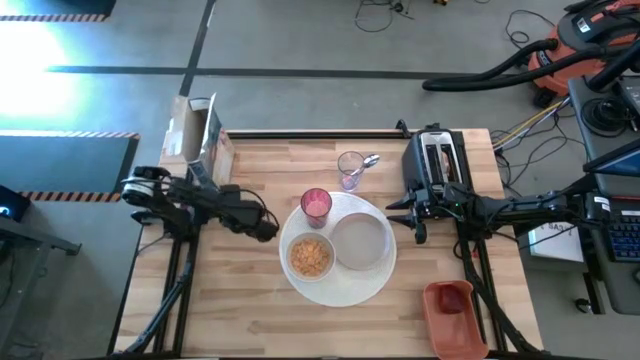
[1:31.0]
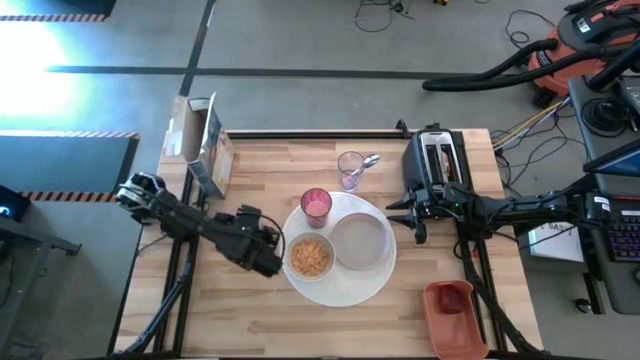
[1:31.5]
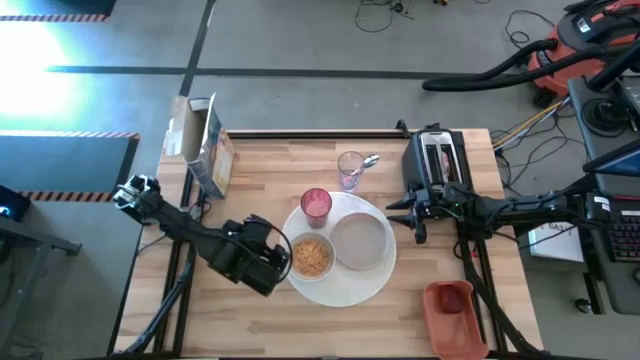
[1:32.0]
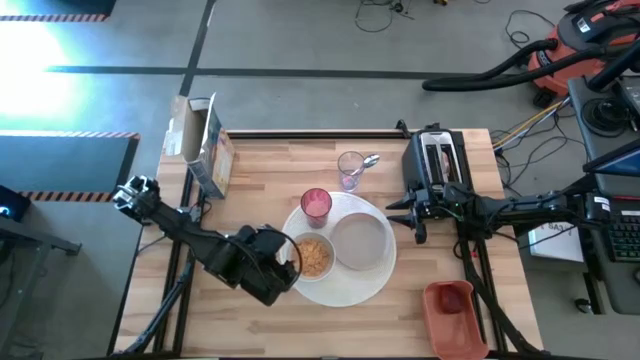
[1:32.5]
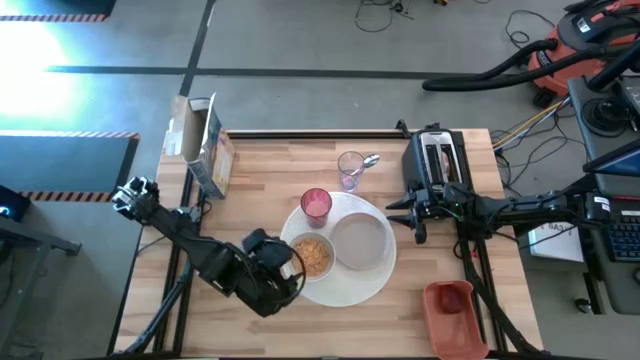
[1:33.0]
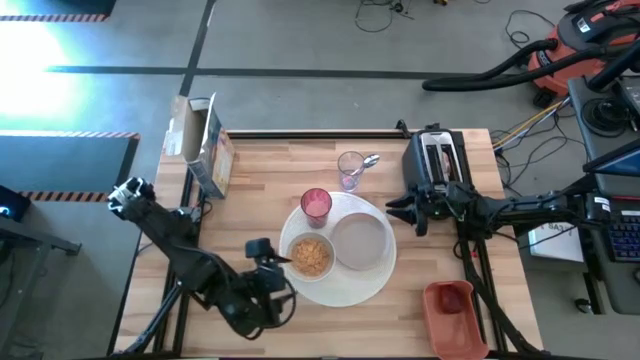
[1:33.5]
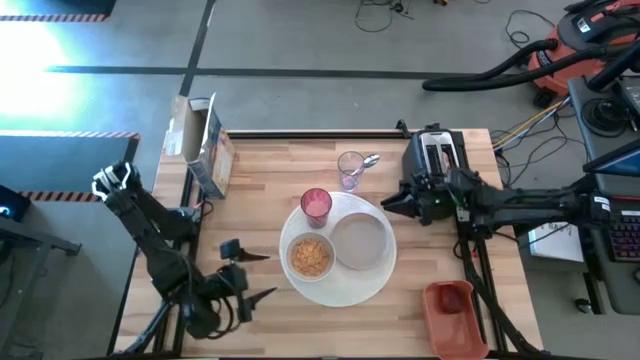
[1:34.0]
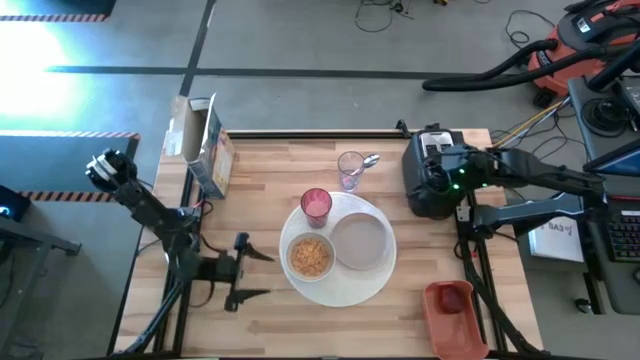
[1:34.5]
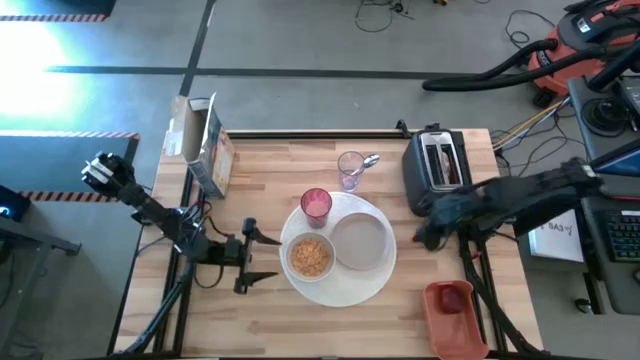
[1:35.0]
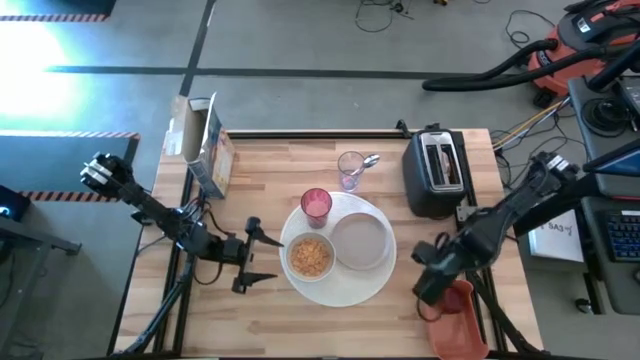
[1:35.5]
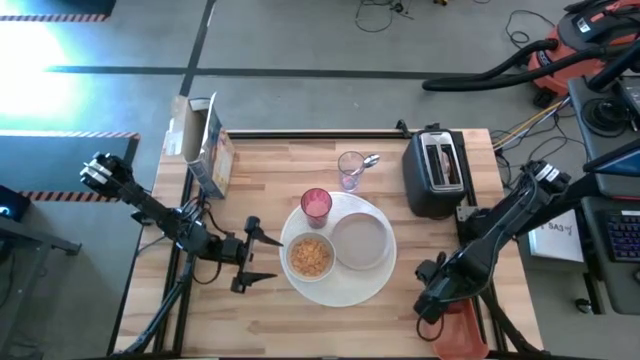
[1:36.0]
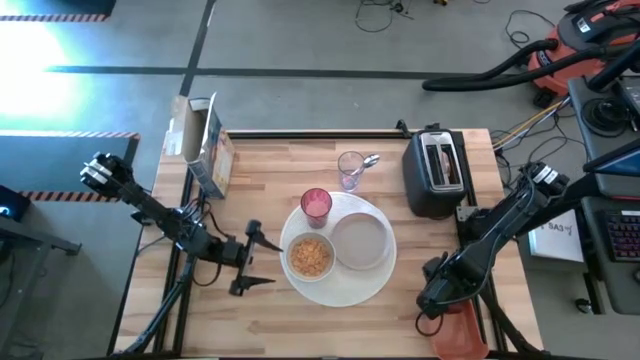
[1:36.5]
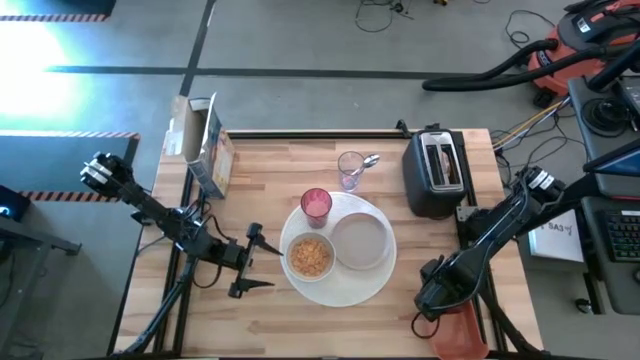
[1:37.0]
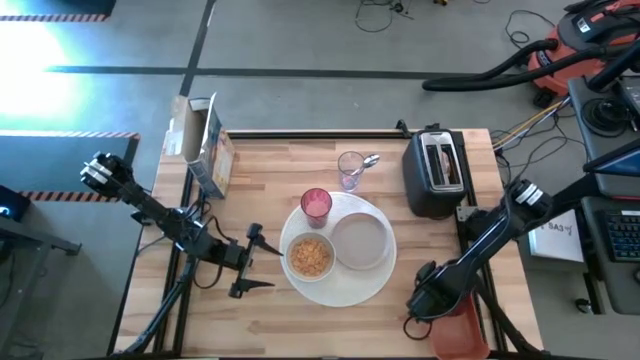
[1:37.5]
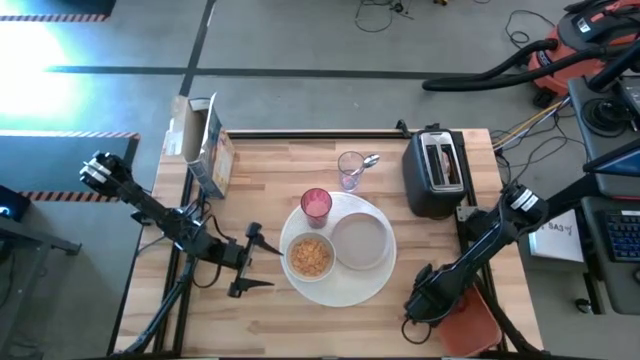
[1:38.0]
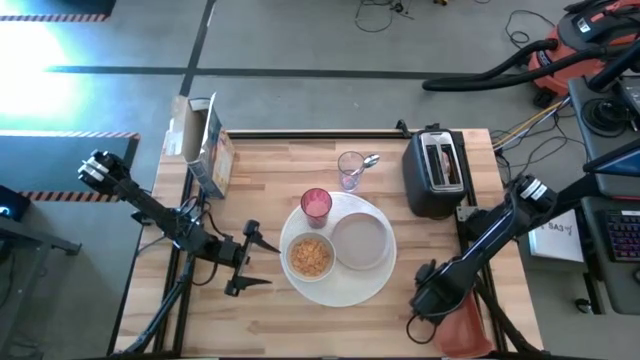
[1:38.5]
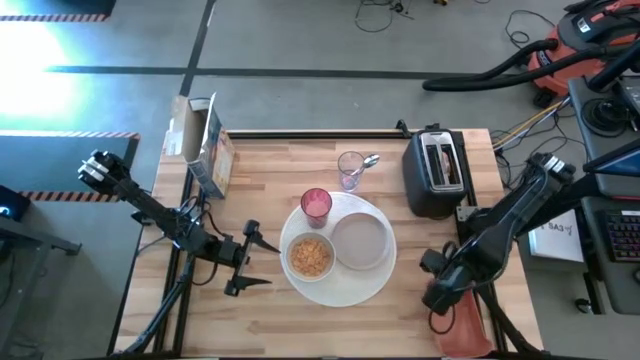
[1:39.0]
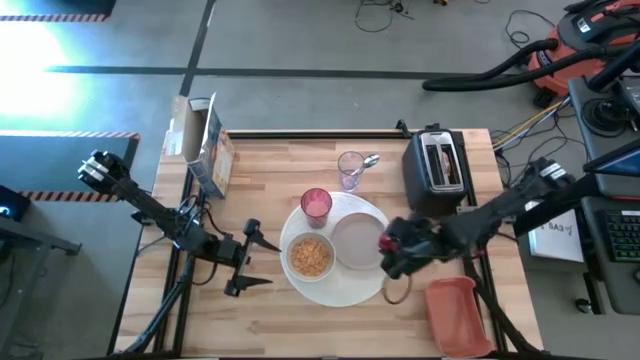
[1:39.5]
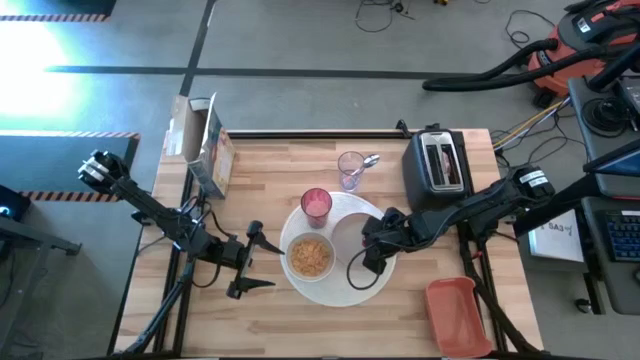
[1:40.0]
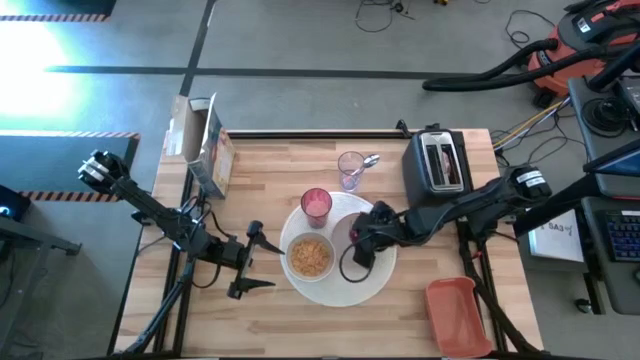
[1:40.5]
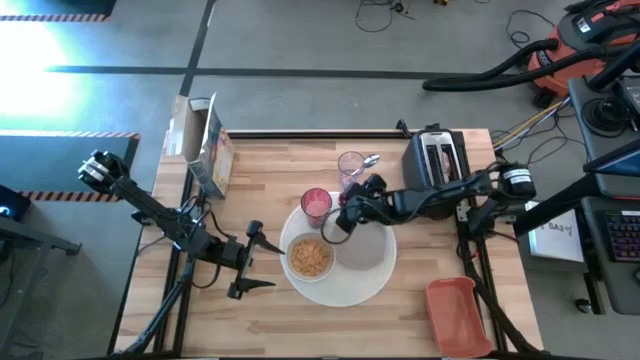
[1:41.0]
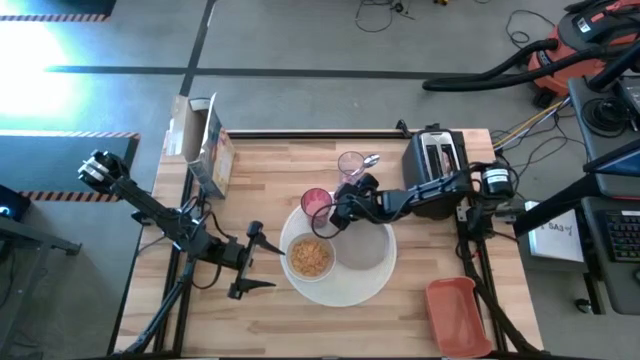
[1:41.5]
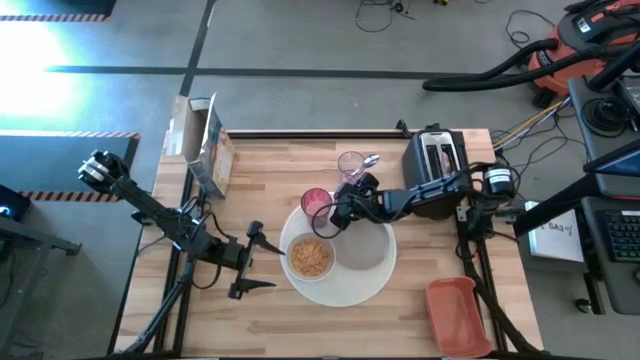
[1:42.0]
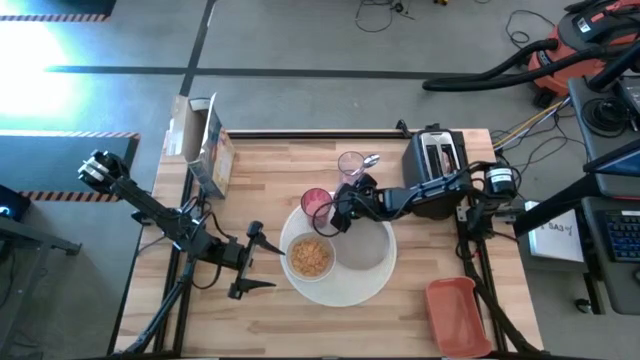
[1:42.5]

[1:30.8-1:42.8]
Task: Arrange a breakfast setting
Put the red apple on the white tablemat to the top of the brown plate

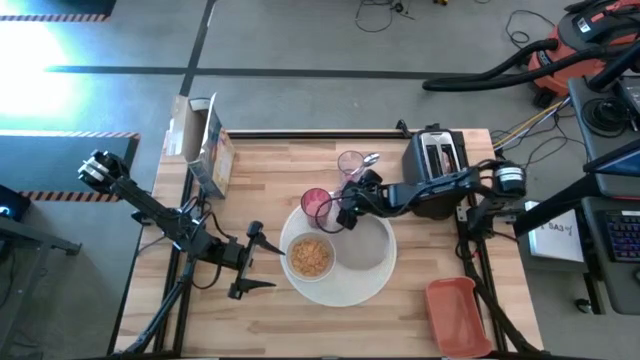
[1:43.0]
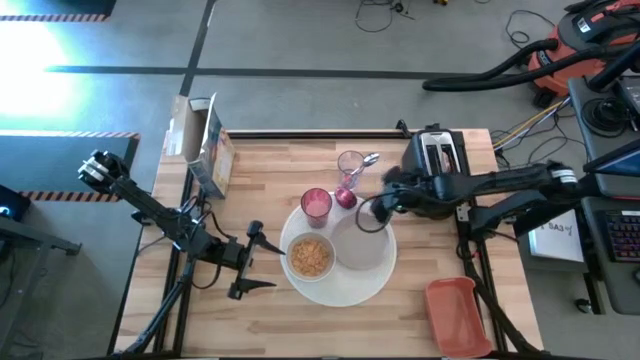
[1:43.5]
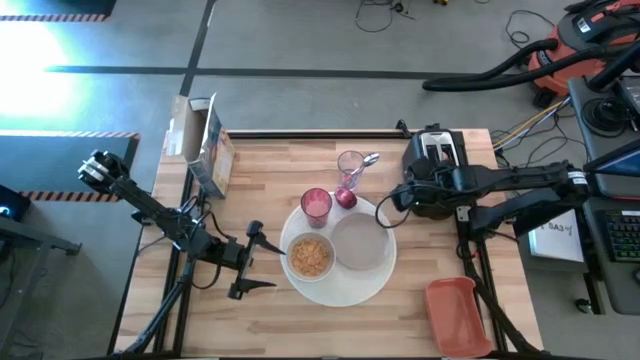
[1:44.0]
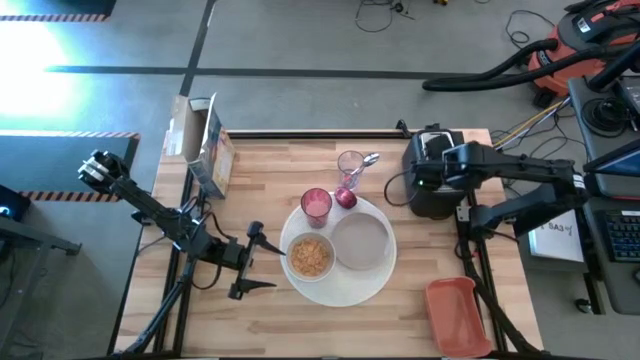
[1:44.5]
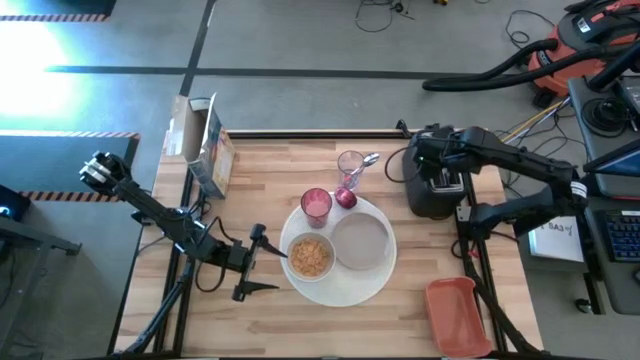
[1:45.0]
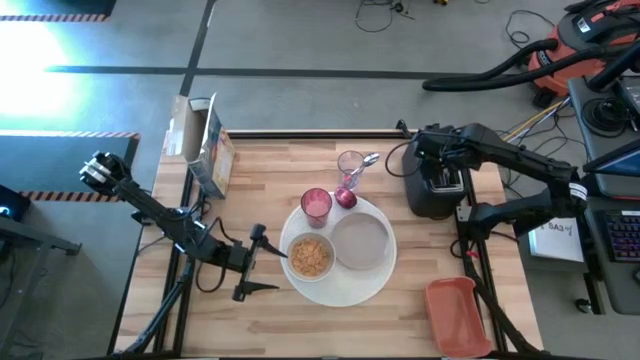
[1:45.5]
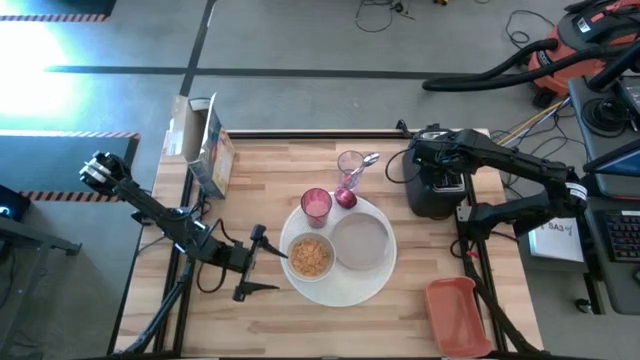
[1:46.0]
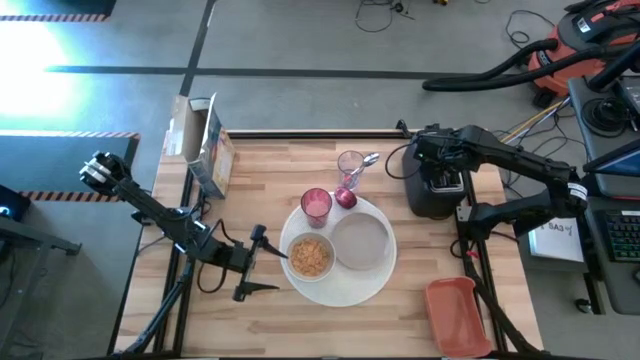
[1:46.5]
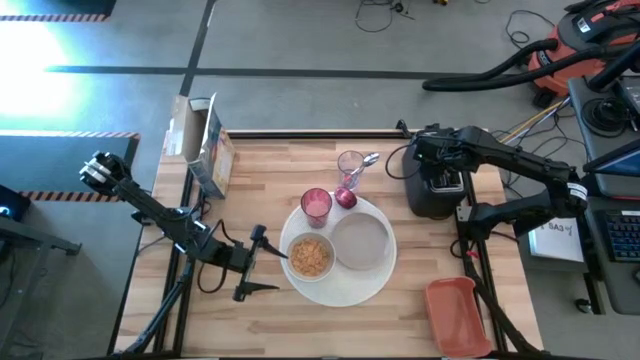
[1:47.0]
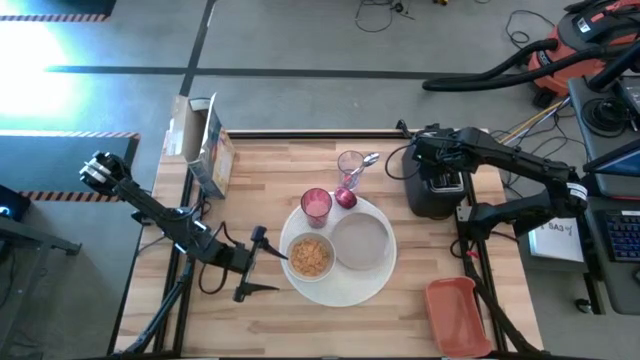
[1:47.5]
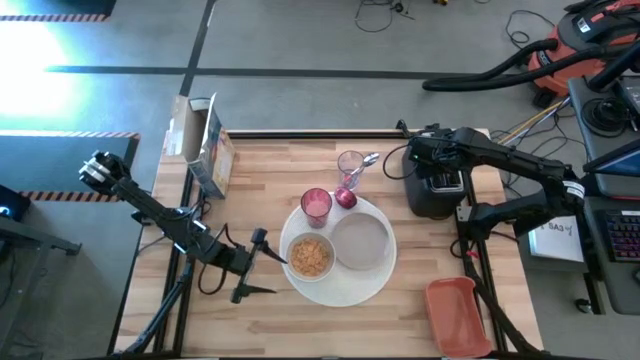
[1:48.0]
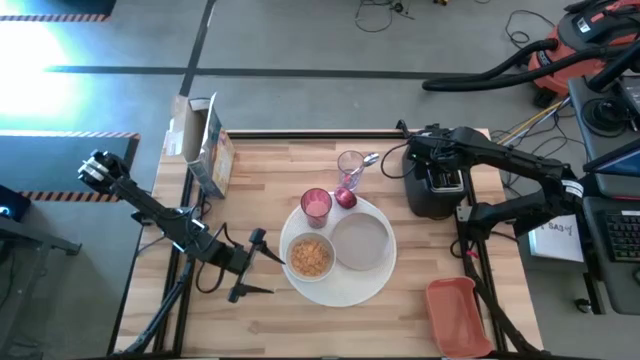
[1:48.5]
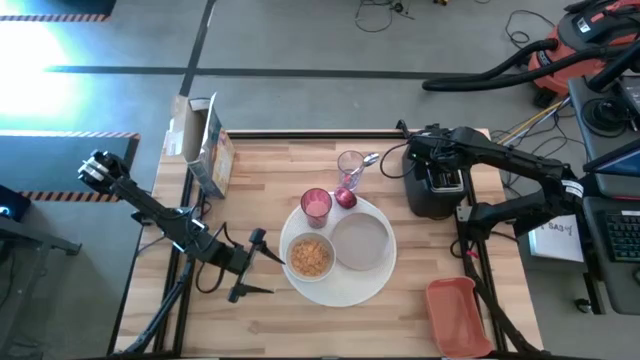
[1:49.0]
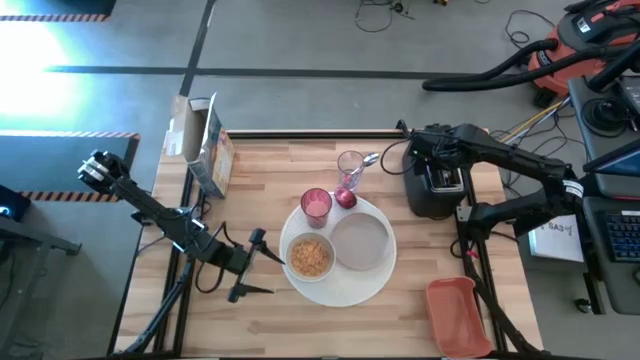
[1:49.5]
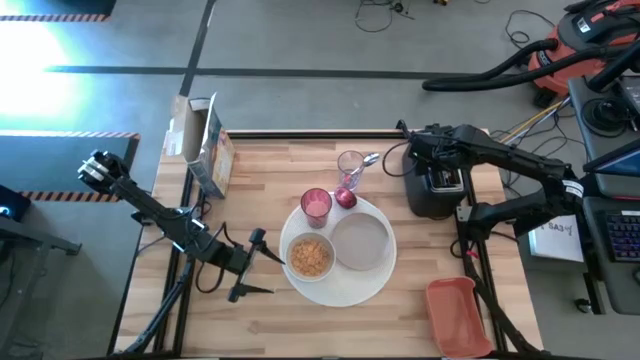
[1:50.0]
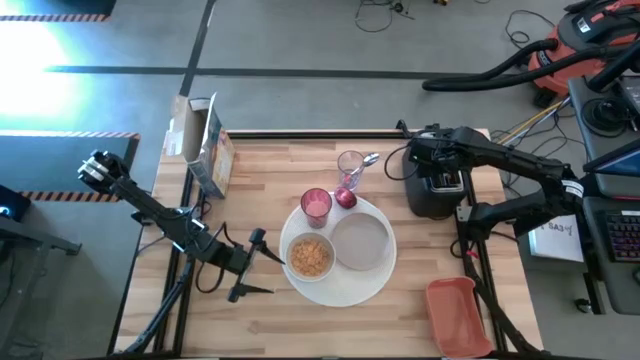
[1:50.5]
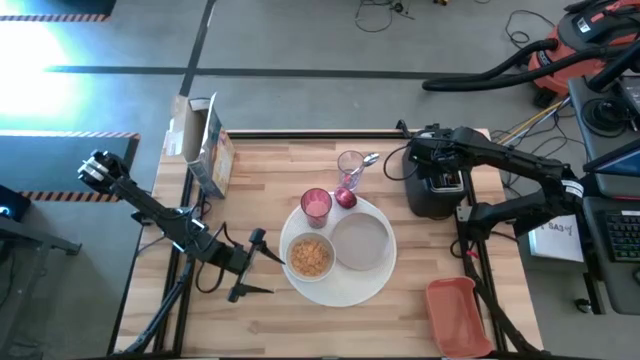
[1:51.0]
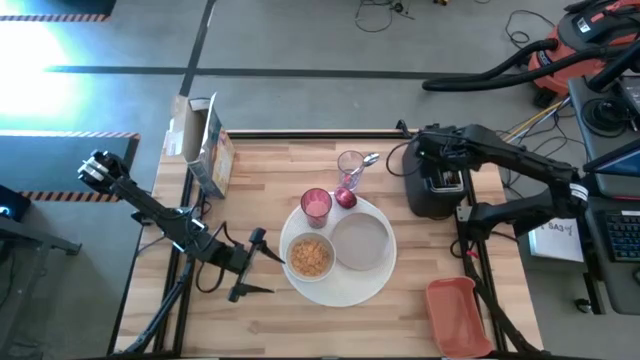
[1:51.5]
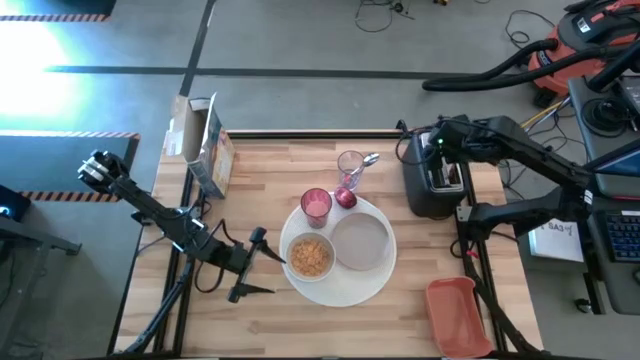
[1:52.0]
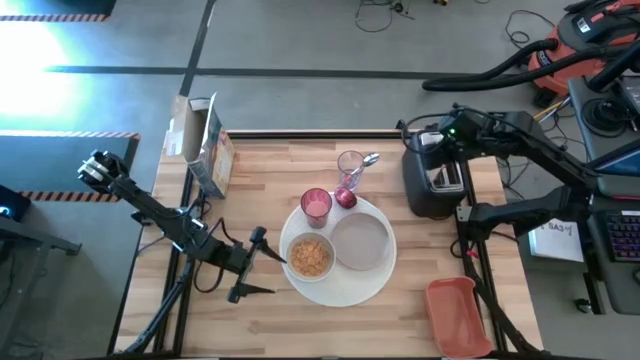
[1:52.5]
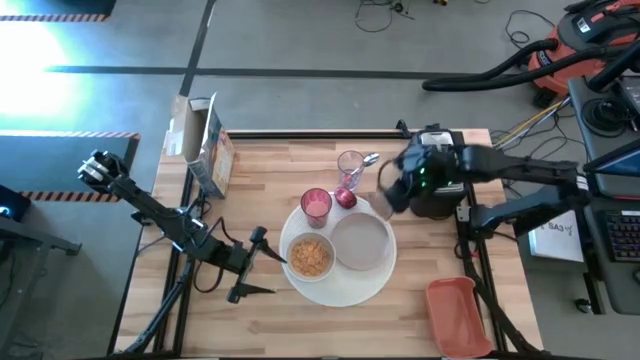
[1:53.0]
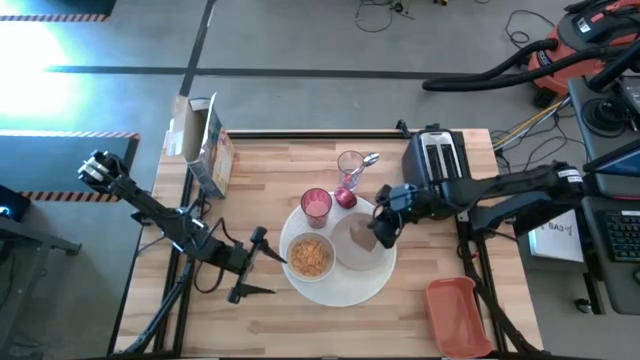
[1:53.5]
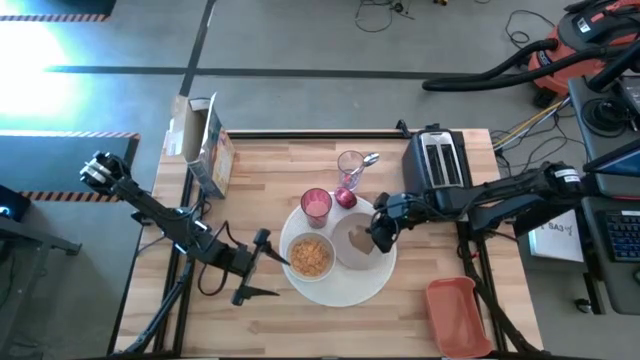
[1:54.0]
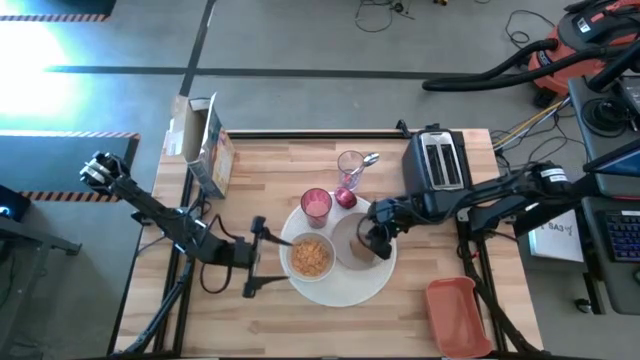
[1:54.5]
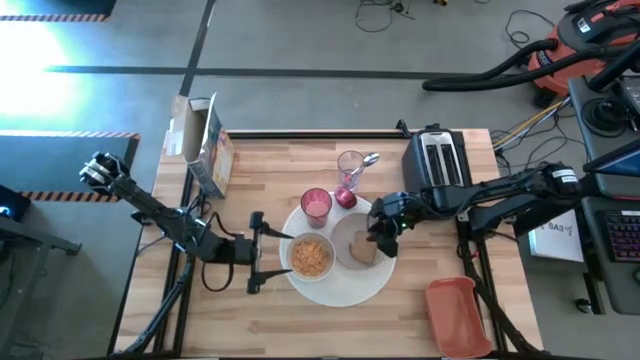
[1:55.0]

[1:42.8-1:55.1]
Put the toast on the brown plate
